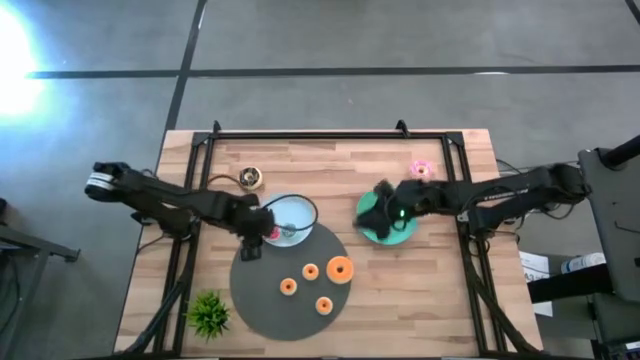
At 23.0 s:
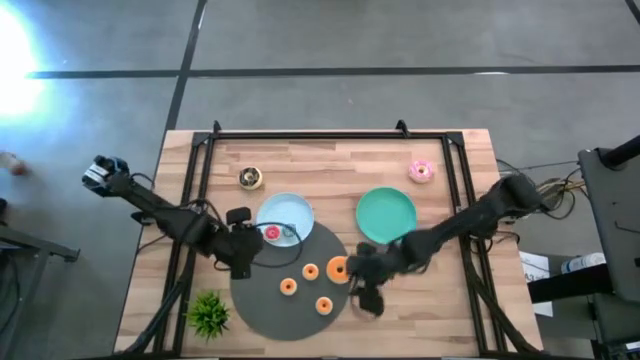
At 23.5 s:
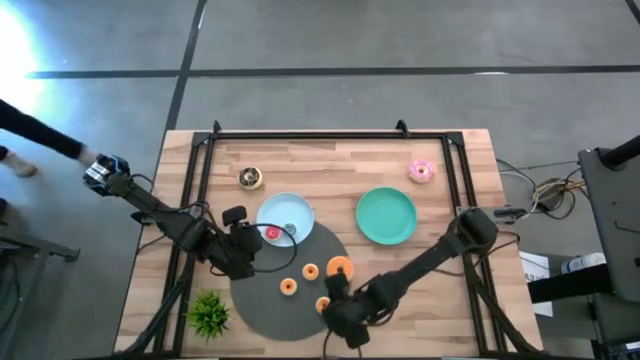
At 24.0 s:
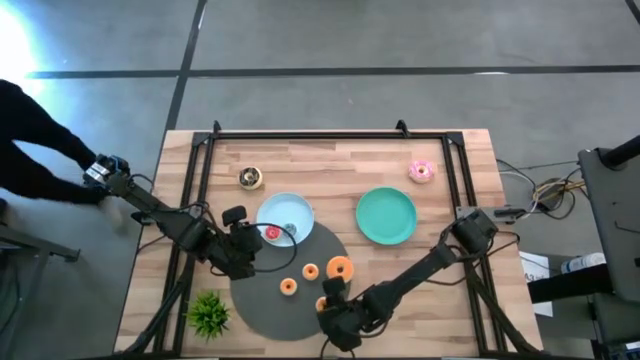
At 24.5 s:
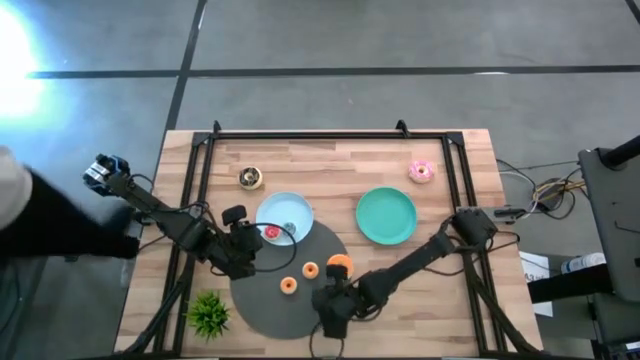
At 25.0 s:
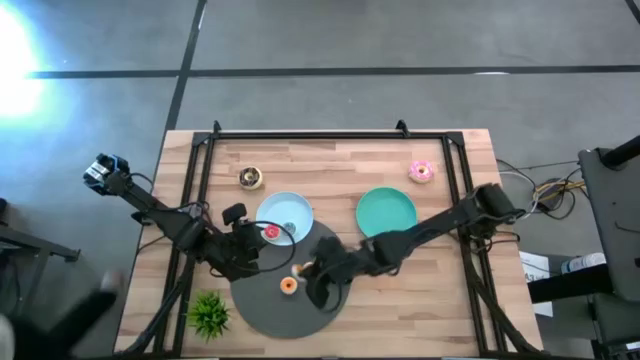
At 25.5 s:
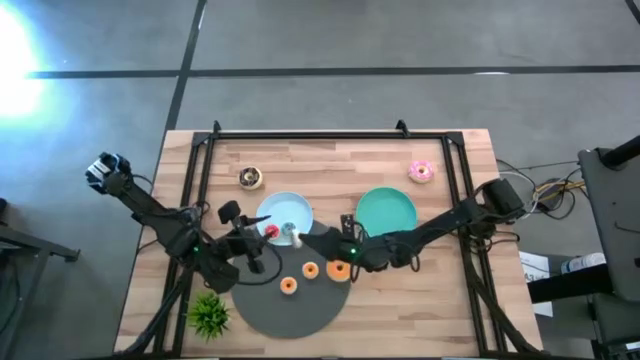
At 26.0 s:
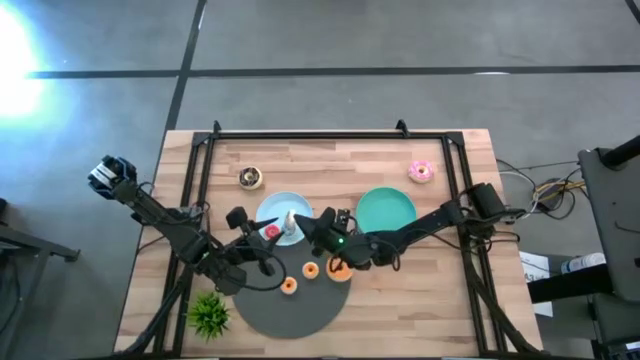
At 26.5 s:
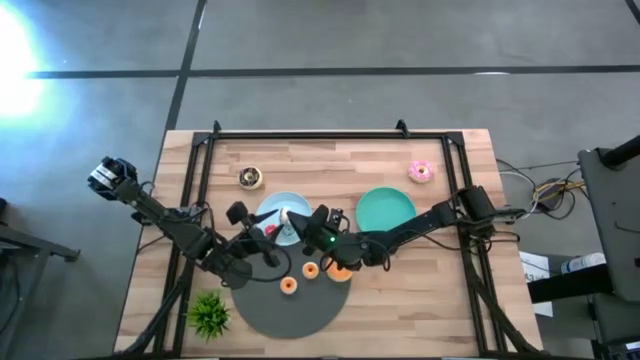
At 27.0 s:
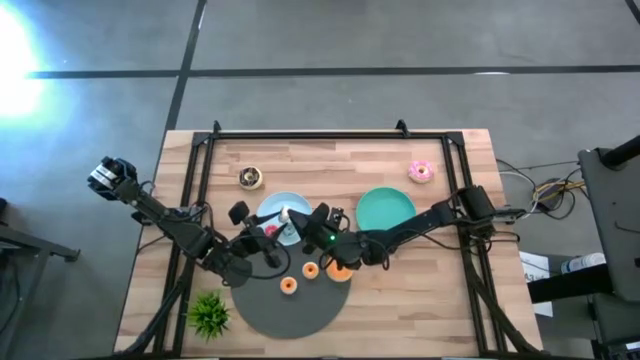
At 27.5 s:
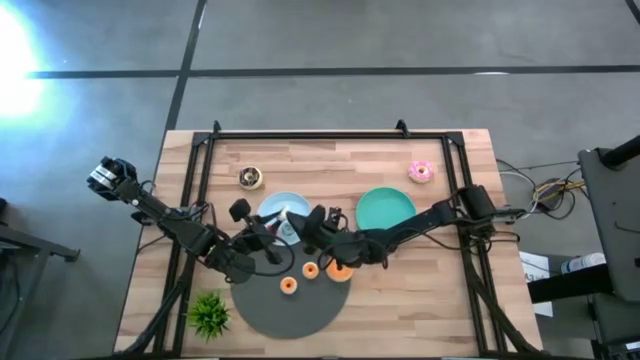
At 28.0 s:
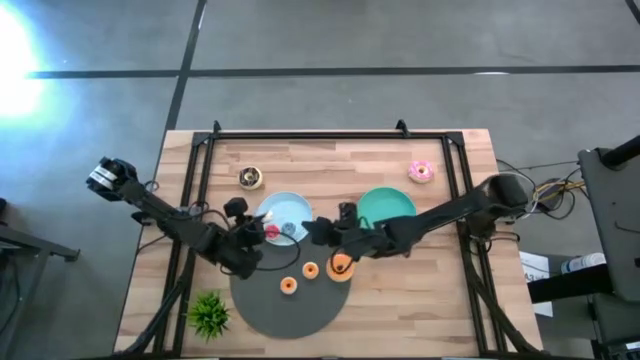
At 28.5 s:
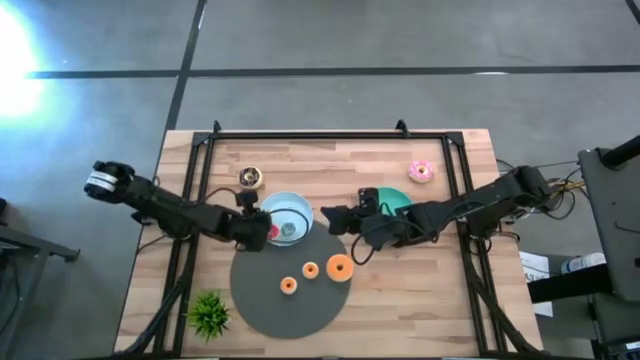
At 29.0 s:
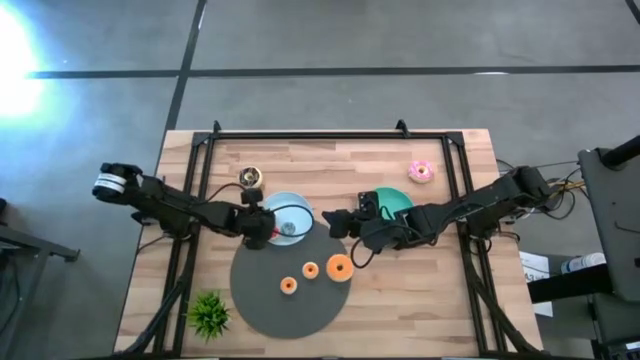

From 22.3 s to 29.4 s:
Task: Pick & Place donuts
Put the small white donut on the white plate

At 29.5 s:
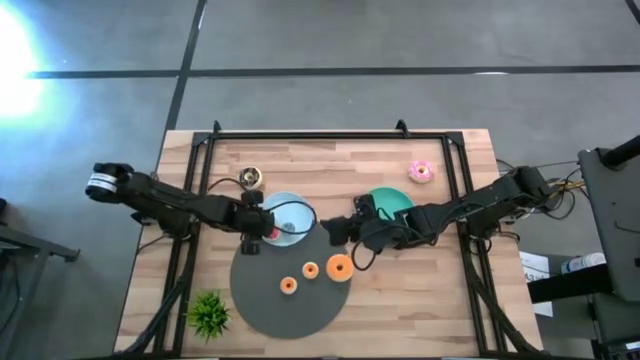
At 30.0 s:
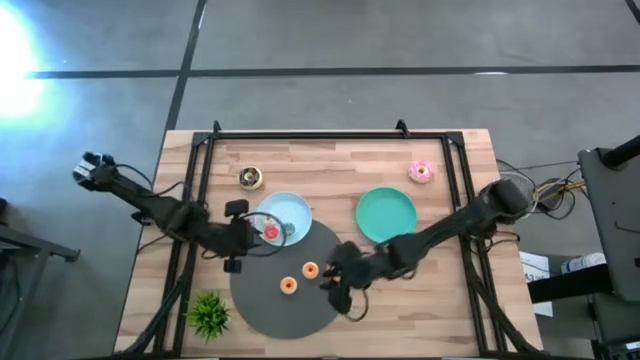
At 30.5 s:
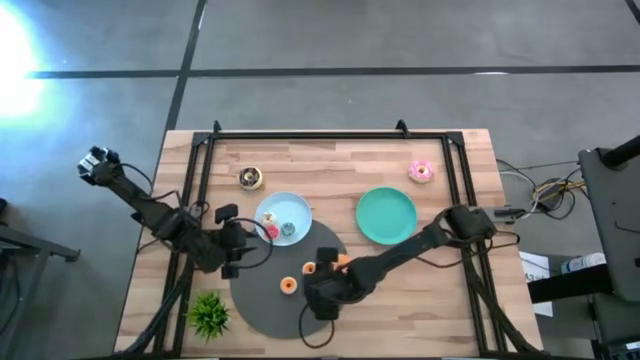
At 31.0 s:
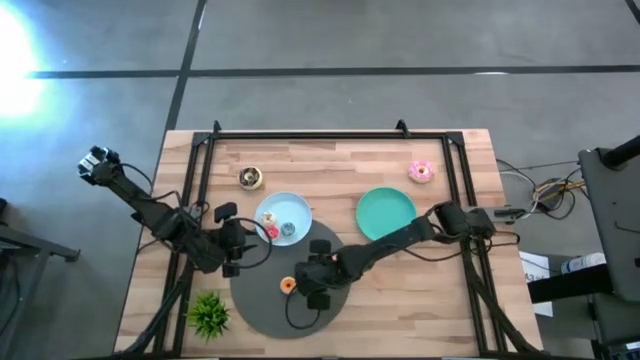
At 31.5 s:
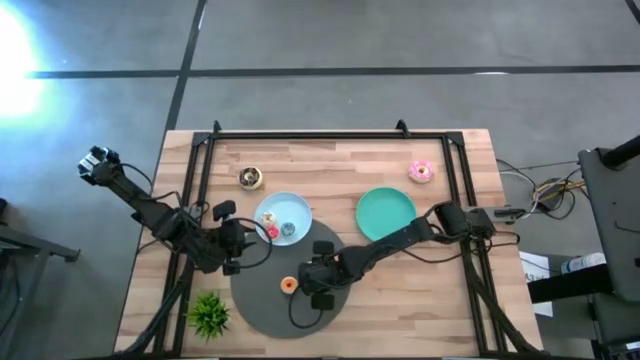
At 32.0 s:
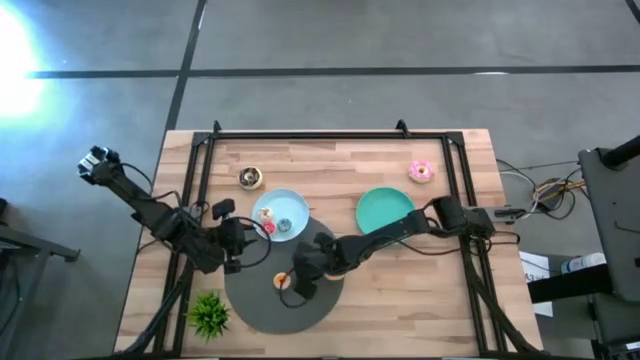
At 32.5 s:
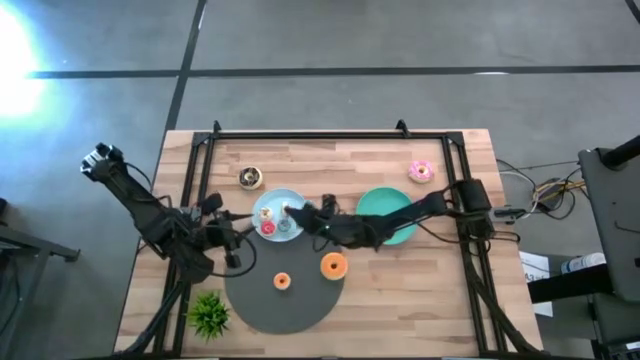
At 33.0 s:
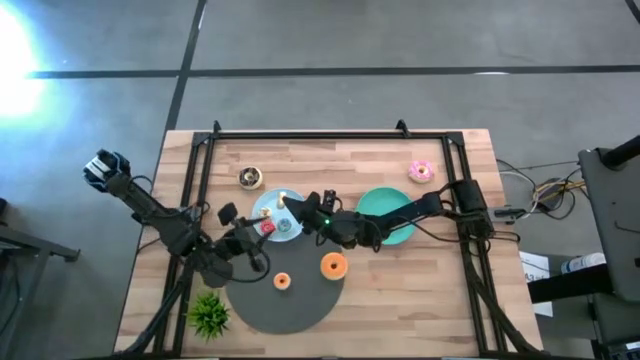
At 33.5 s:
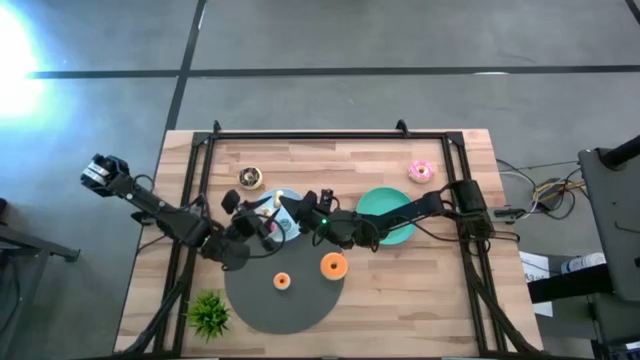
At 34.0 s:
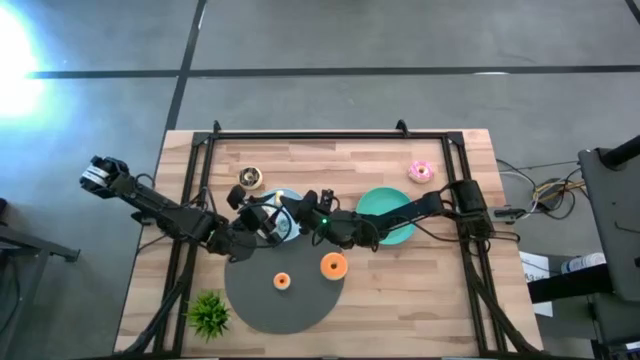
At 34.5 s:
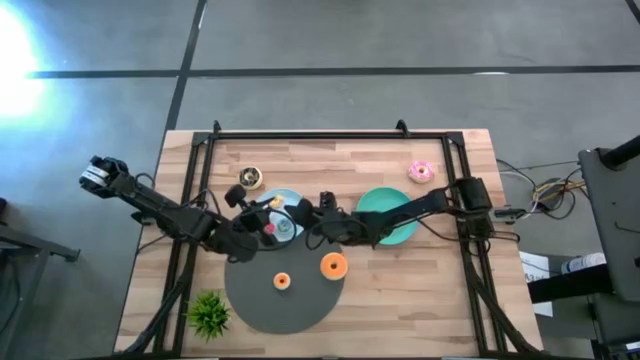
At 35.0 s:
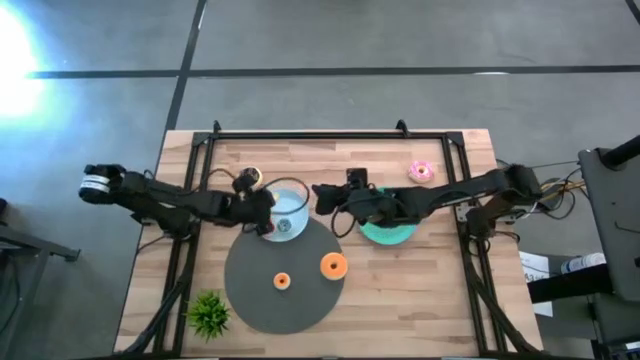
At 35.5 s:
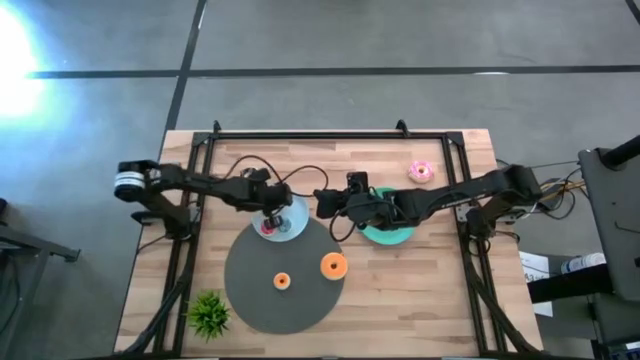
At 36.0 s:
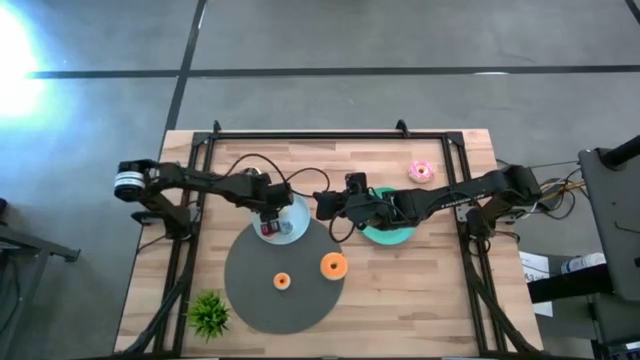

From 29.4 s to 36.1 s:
Put the small yellow donut on the white plate

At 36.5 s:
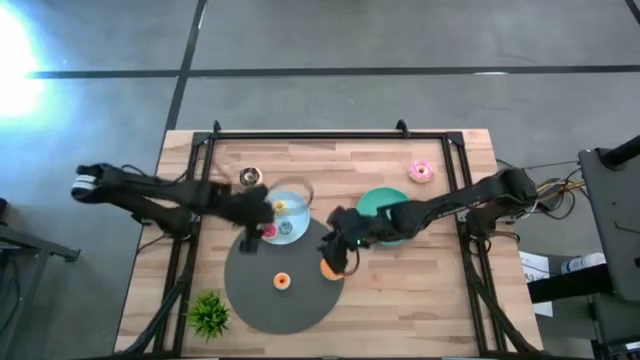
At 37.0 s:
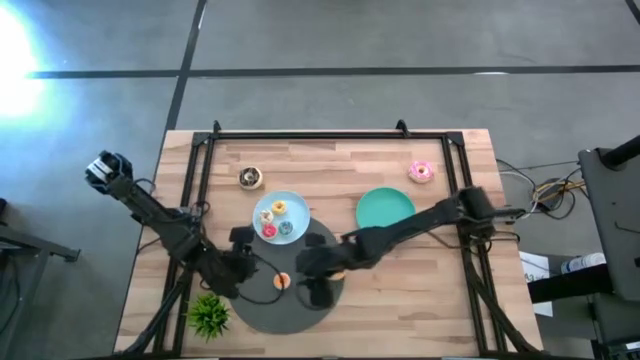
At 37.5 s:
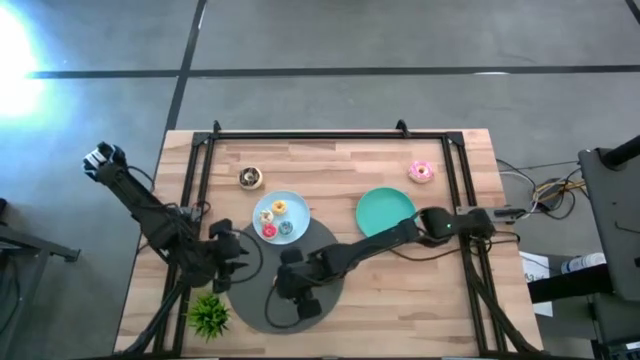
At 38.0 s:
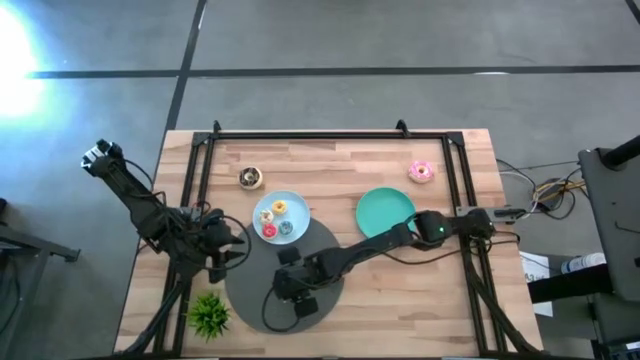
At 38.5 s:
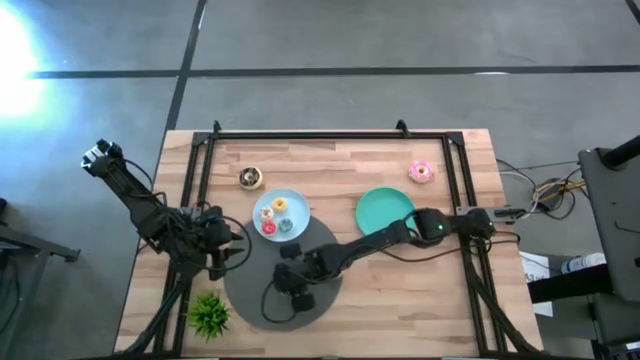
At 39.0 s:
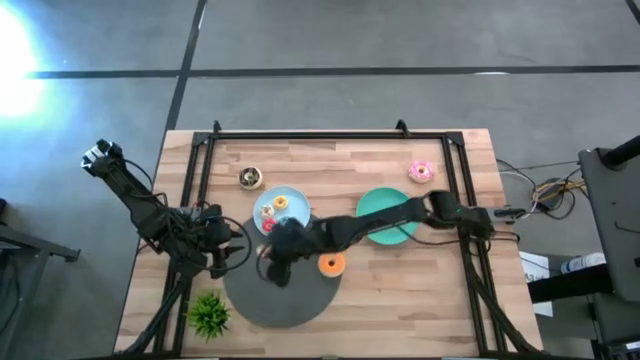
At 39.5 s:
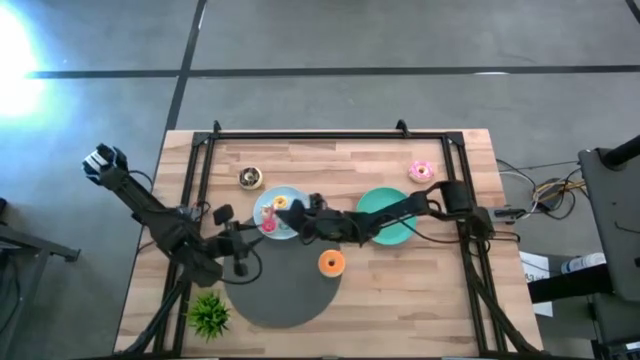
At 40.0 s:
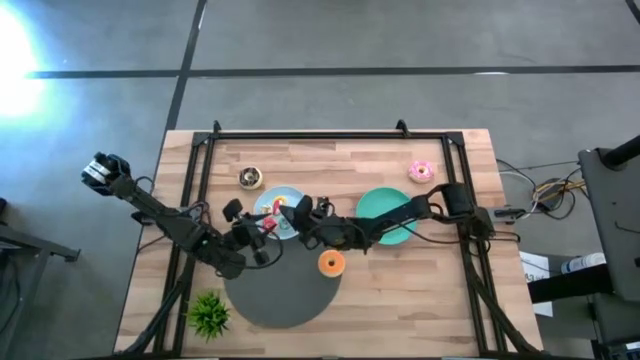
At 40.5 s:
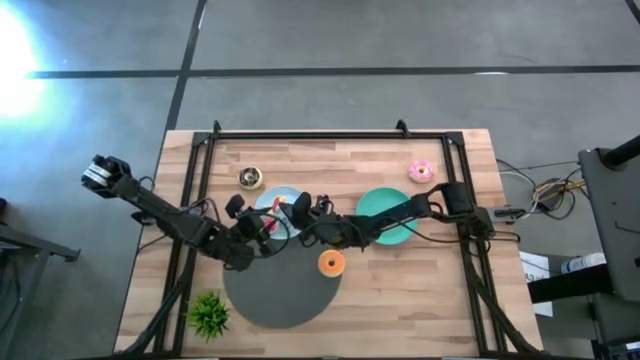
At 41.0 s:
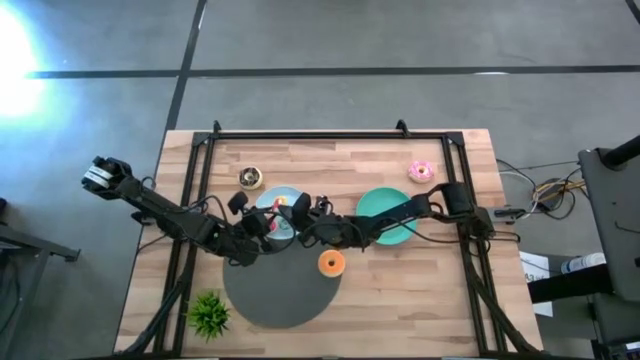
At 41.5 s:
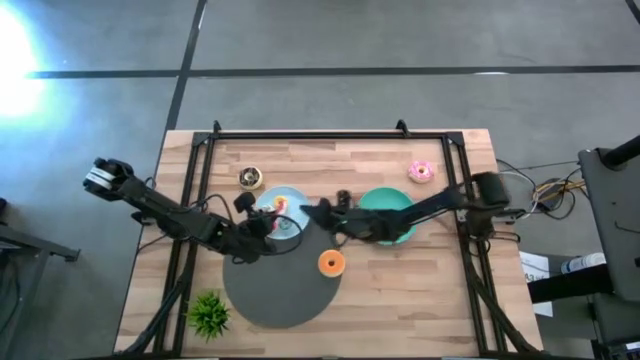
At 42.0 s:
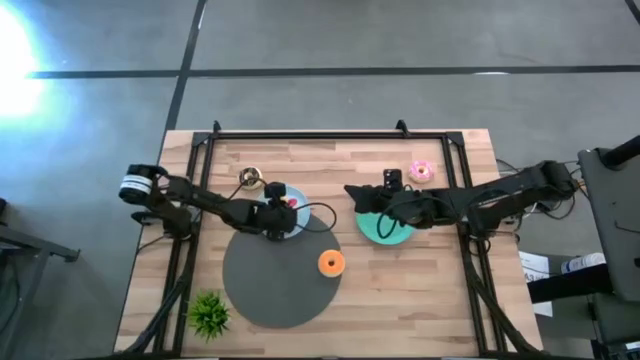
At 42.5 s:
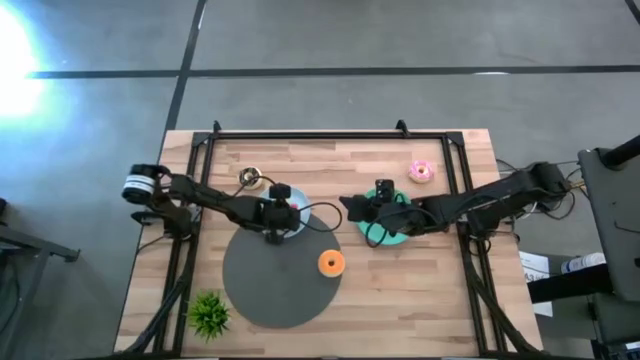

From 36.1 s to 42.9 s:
Put the small red donut on the white plate
